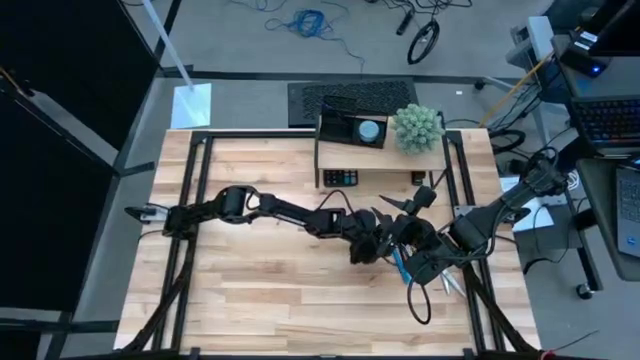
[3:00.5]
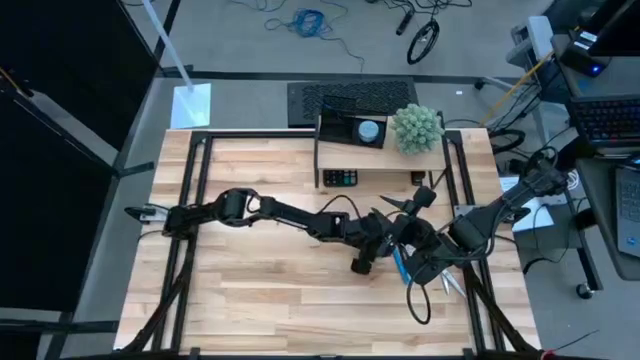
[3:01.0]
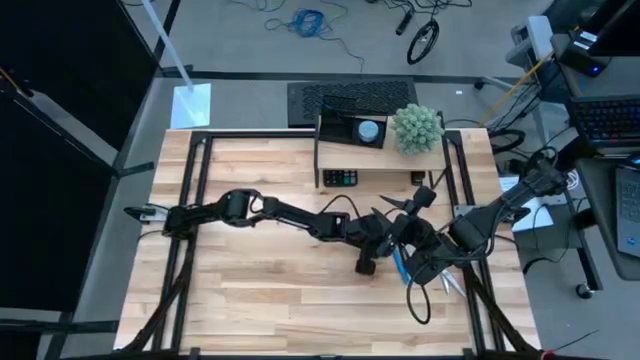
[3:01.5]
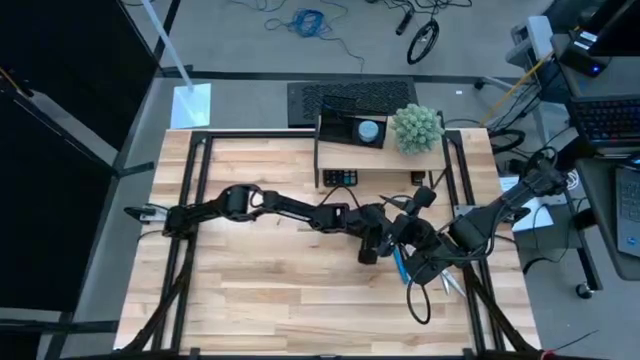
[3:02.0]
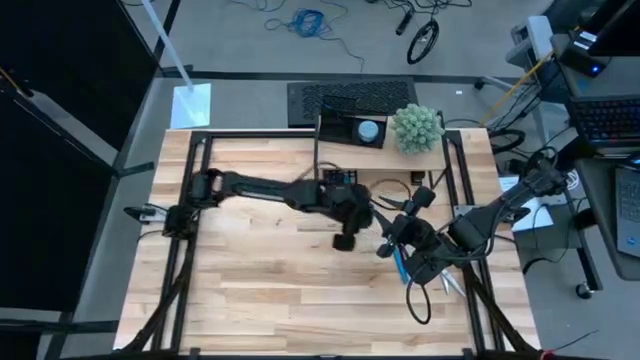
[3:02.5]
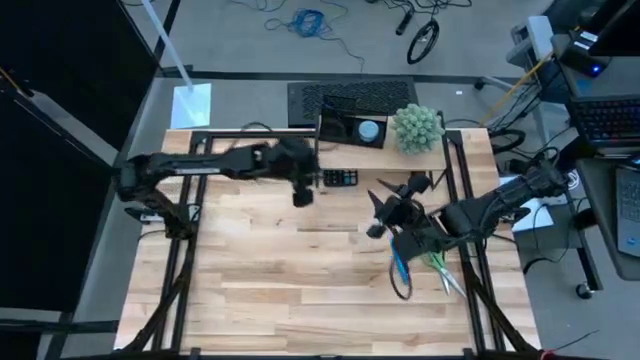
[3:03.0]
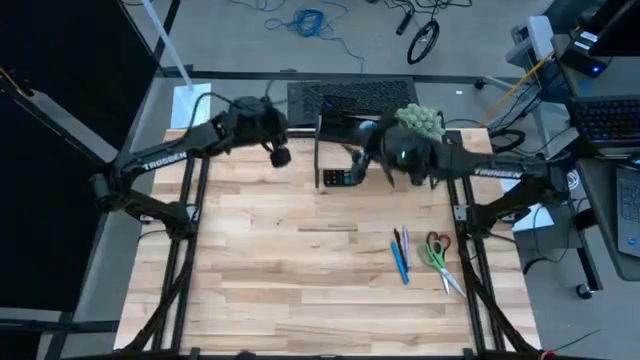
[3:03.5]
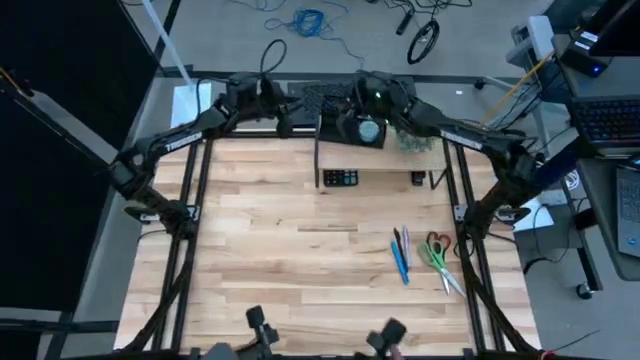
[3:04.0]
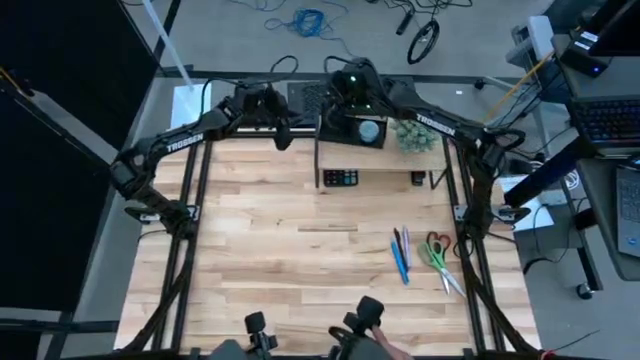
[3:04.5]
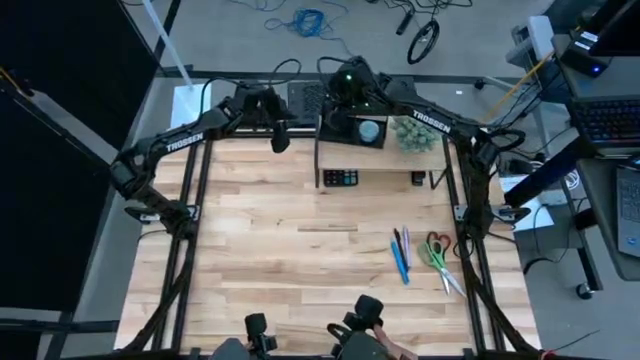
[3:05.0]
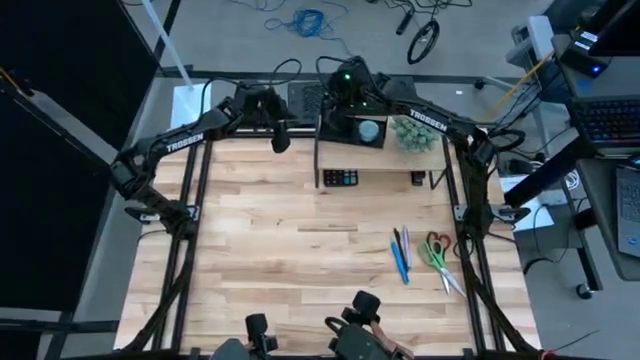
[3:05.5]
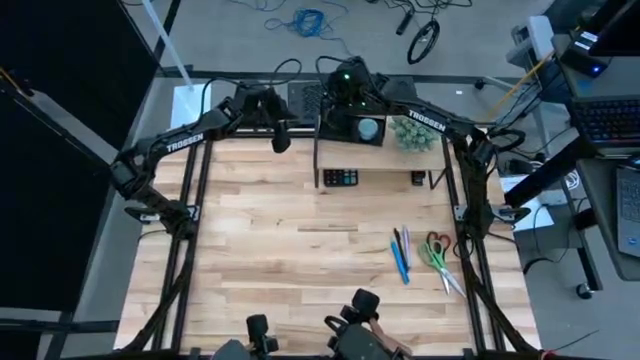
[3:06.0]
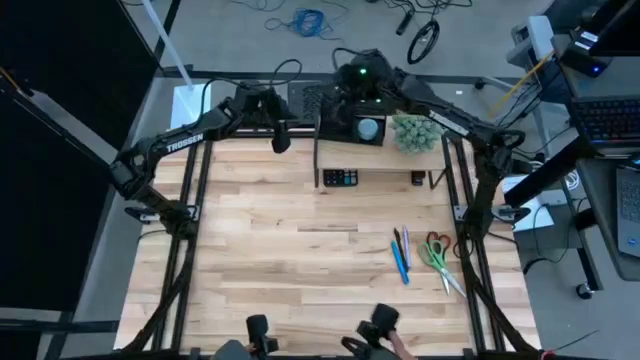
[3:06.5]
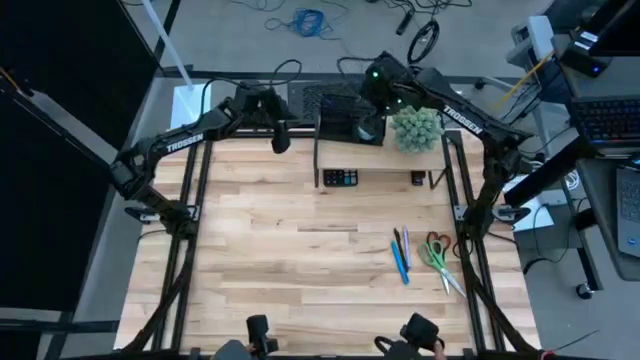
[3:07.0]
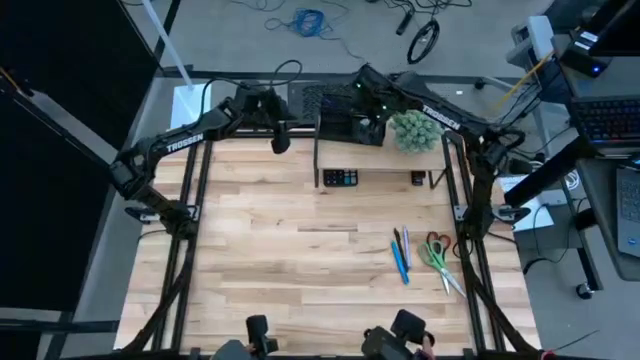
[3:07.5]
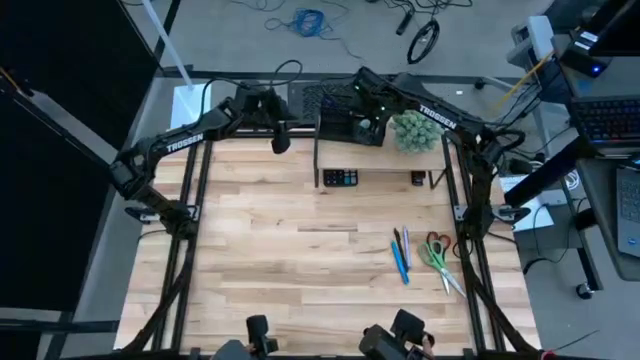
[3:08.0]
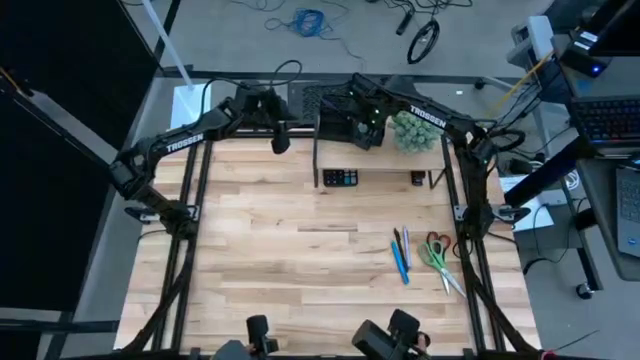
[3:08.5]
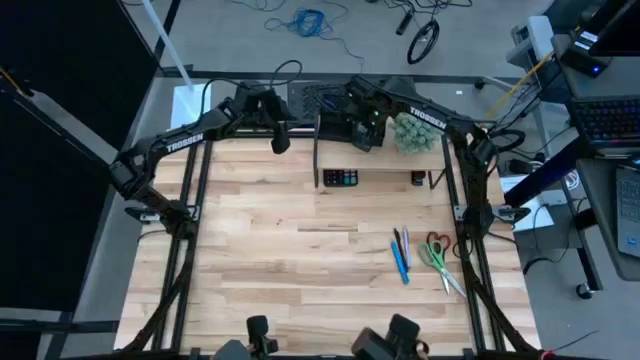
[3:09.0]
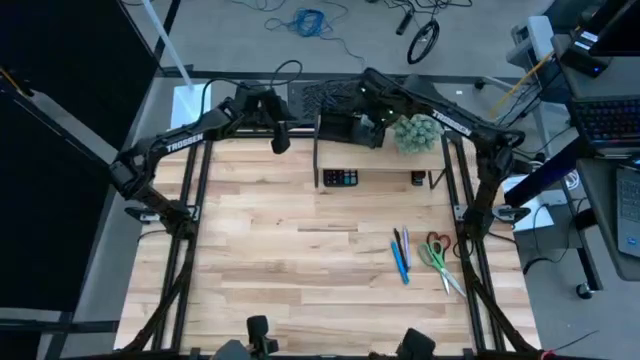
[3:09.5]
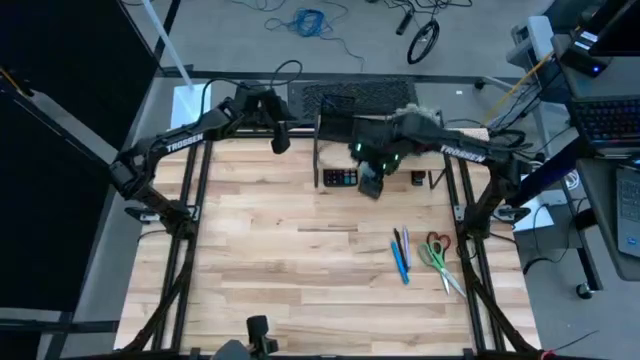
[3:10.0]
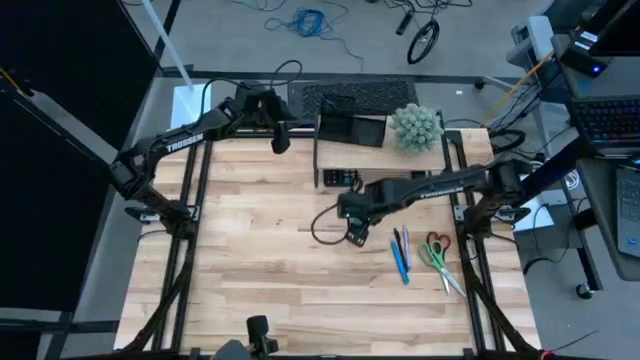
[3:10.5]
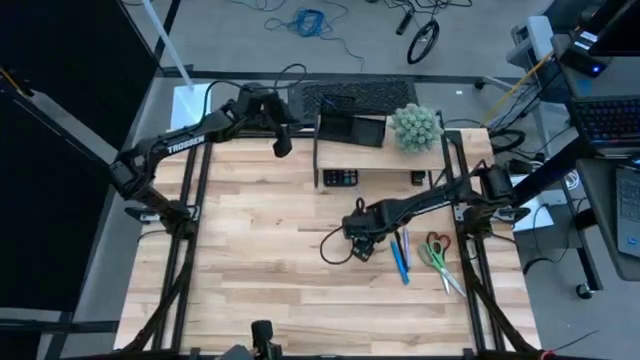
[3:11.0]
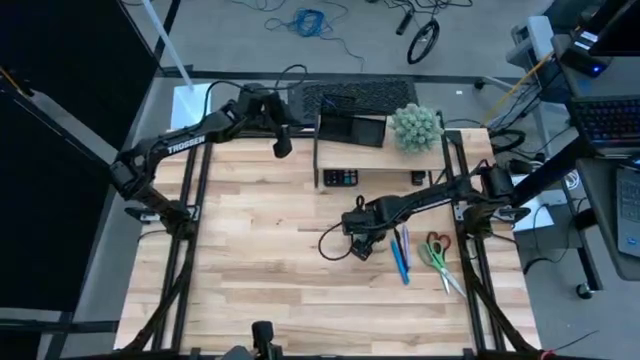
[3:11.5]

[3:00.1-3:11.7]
Task: Pick and place office supplies into organizer
Remove the green scented candle from the black desk organizer on the shelf

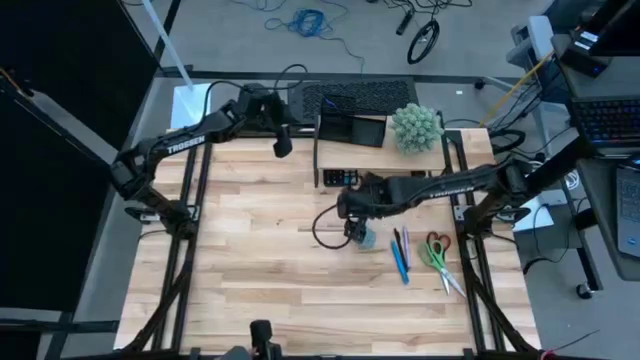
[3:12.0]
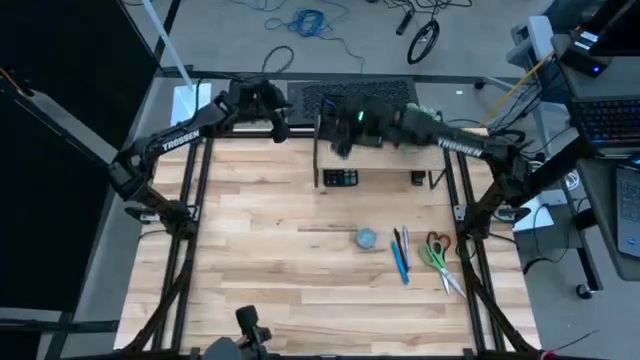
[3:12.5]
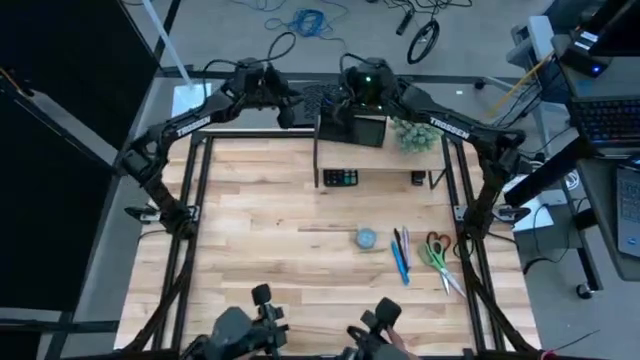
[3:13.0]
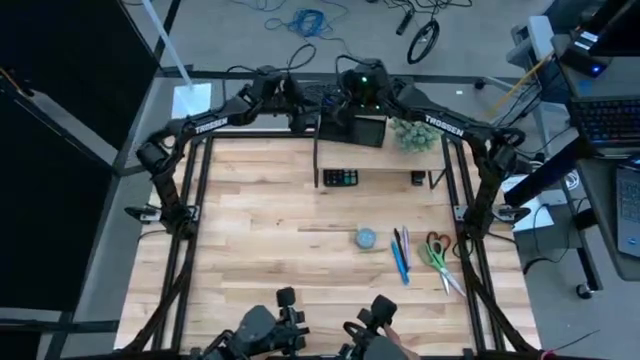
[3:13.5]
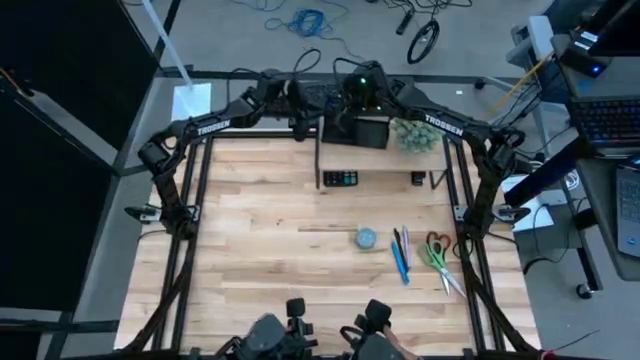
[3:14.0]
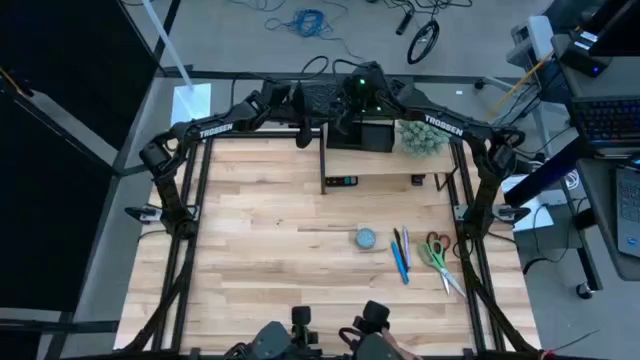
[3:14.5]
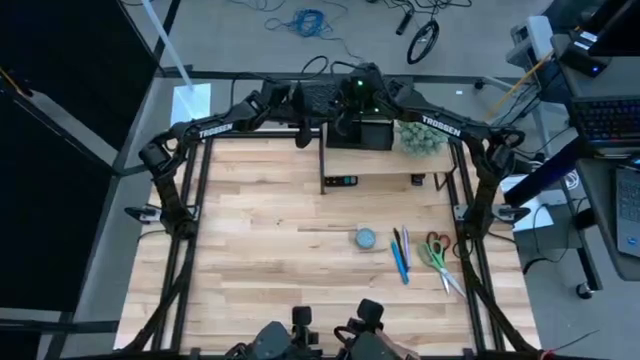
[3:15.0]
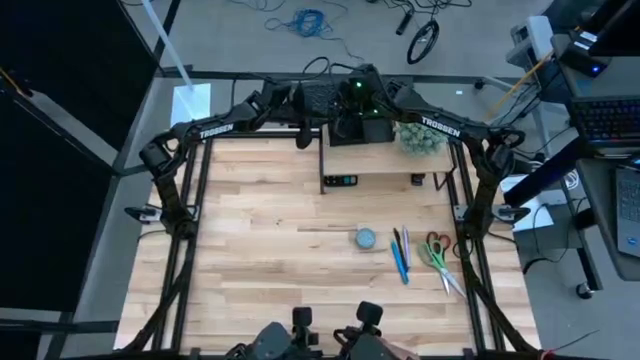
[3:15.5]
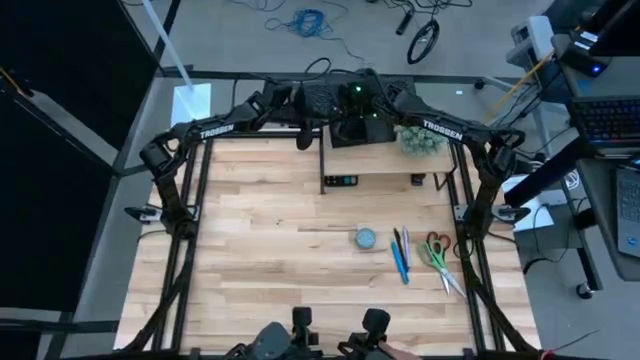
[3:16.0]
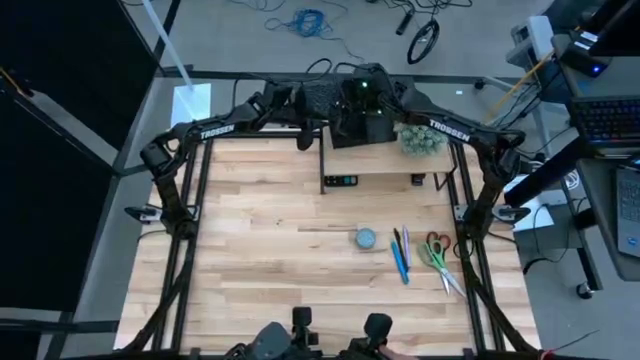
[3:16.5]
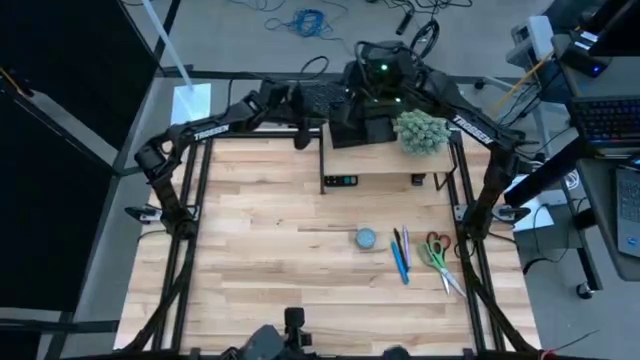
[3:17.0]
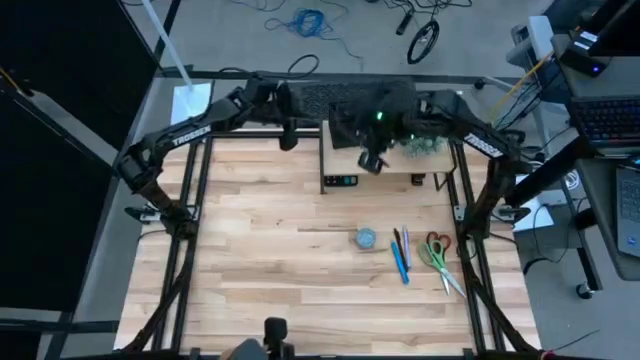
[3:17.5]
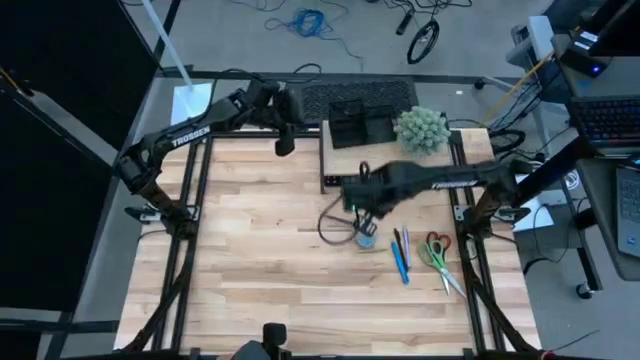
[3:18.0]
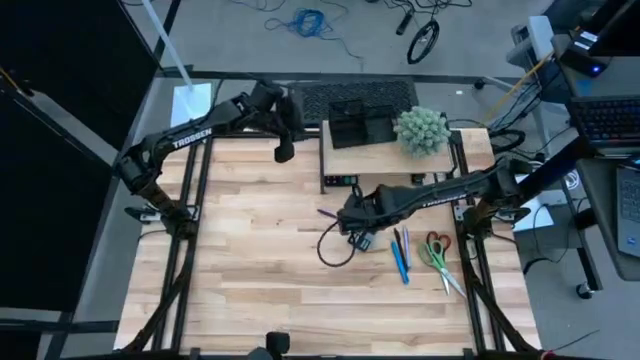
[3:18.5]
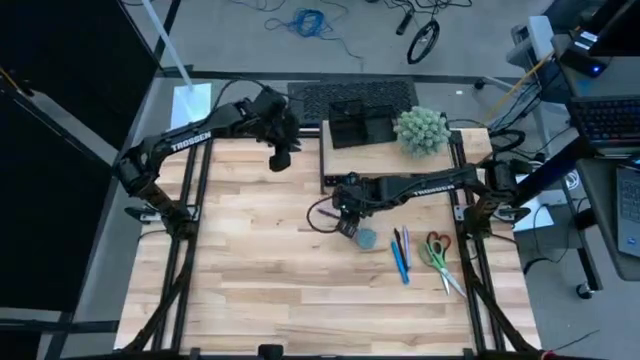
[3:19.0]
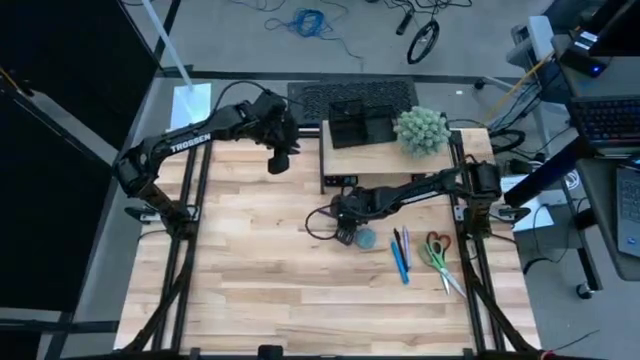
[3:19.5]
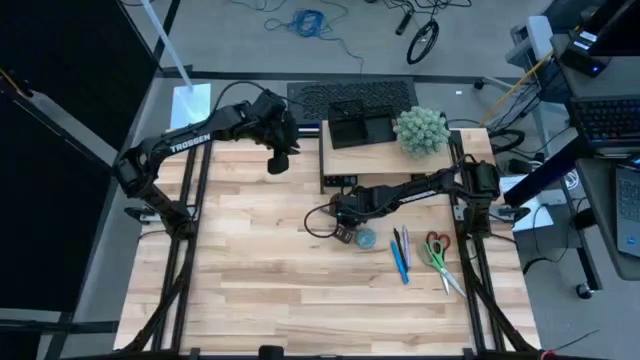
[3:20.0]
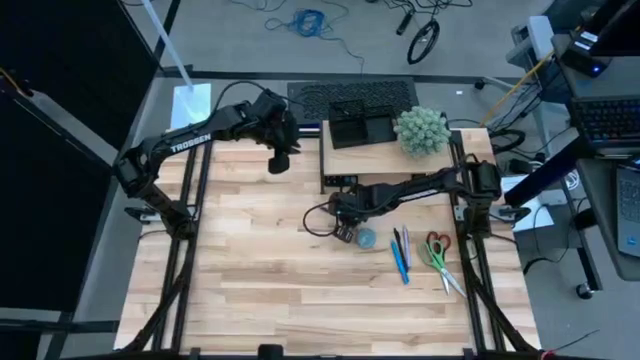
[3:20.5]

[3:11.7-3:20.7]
Remove the dark blue pen from the black desk organizer on the shelf

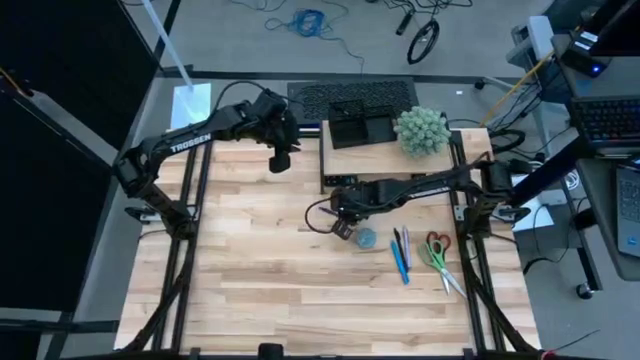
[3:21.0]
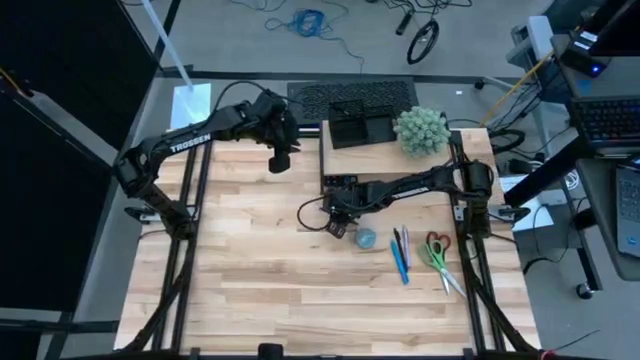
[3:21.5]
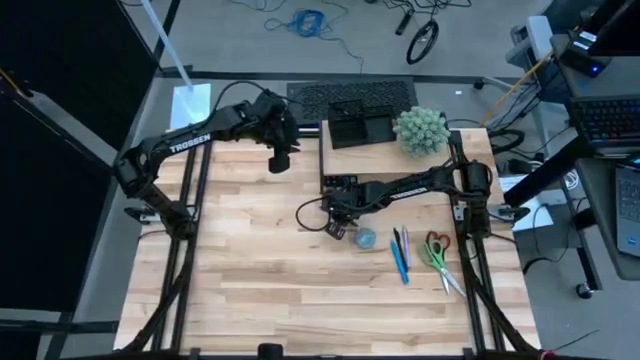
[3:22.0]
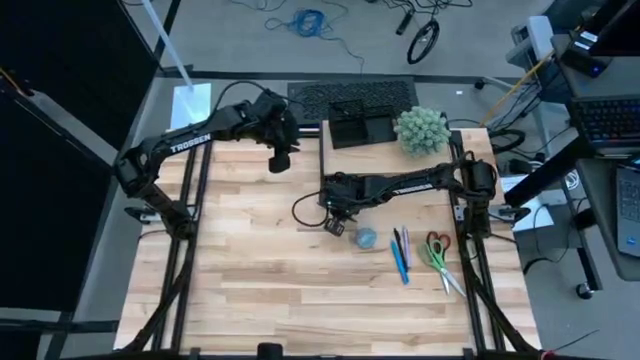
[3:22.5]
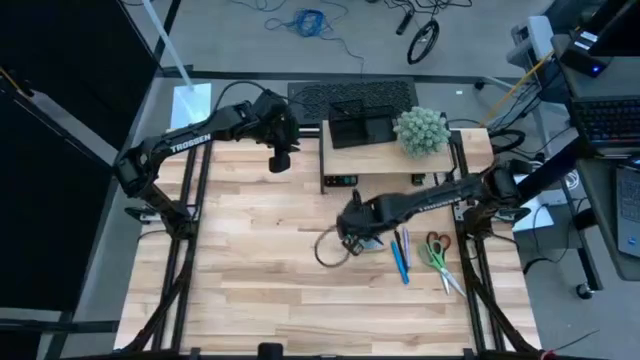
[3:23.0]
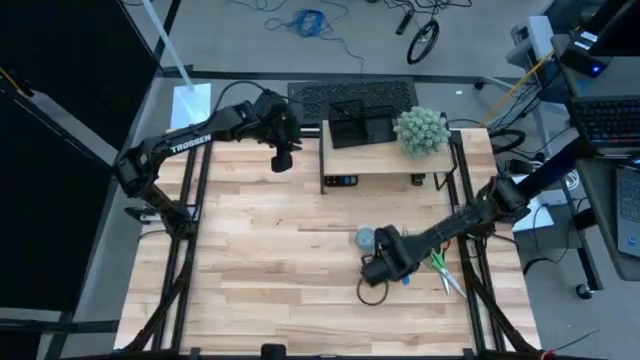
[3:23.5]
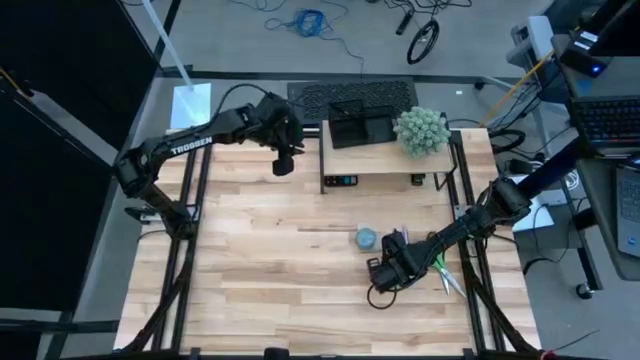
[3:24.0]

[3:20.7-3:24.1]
Remove the dark blue pen from the black desk organizer on the shelf
